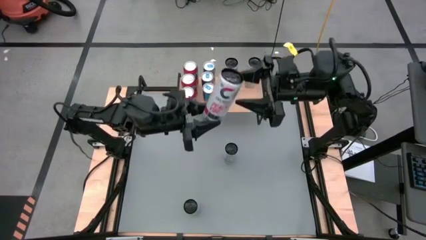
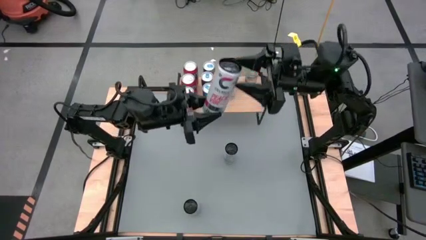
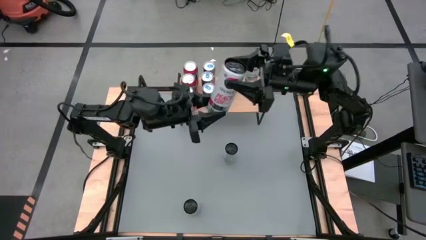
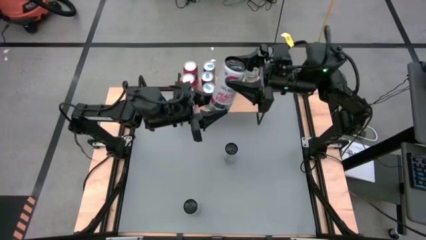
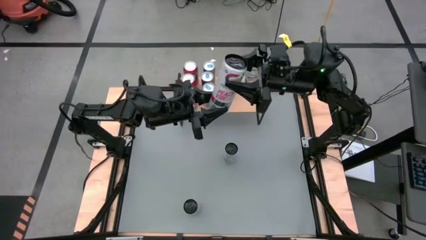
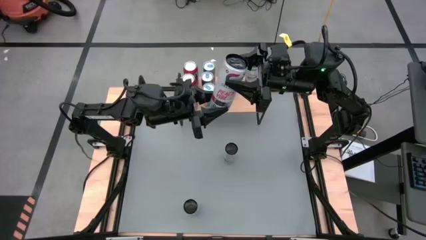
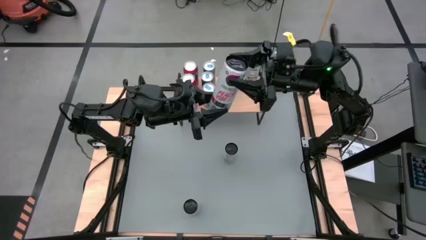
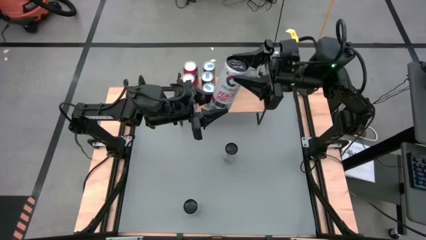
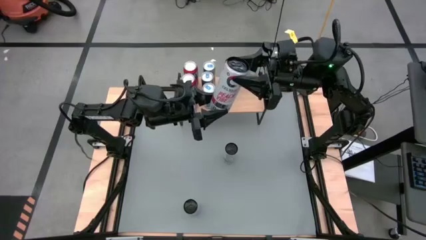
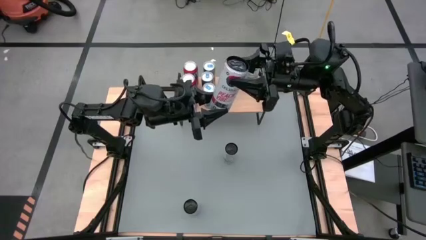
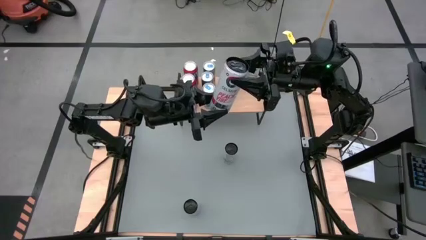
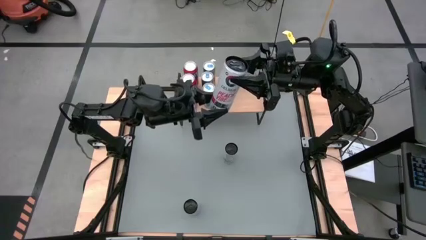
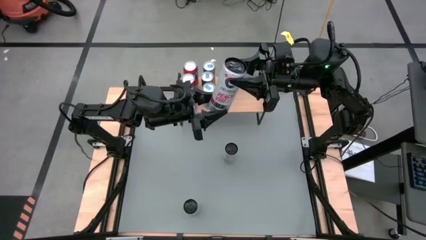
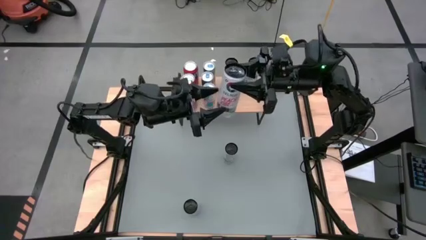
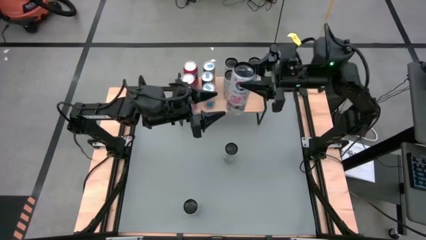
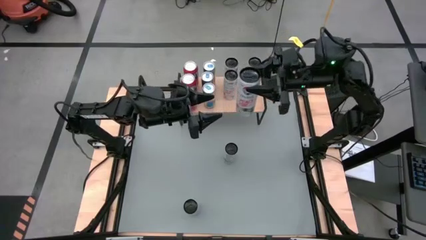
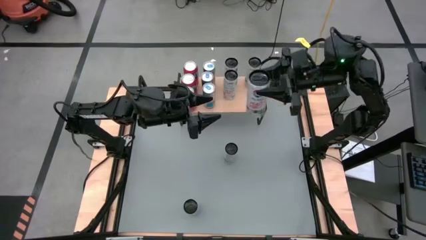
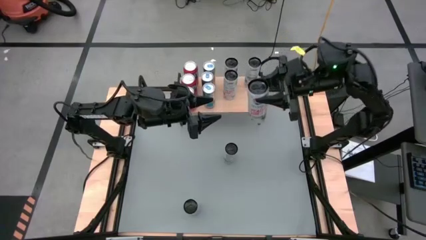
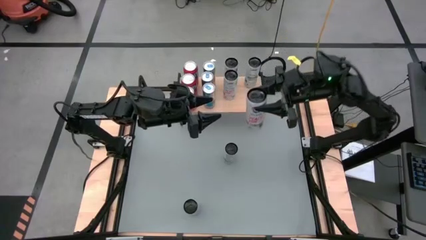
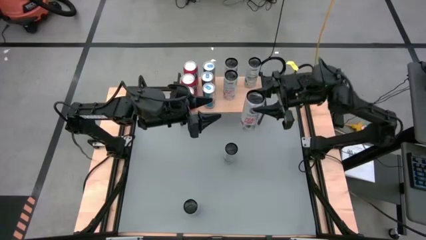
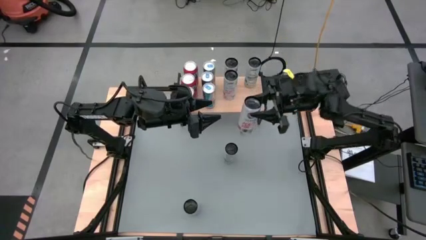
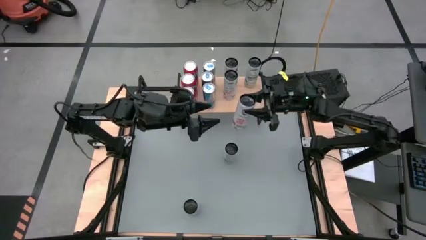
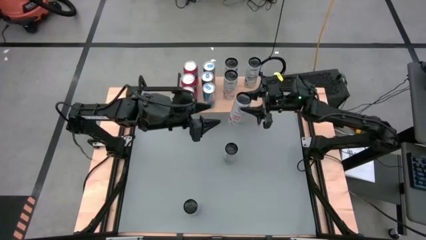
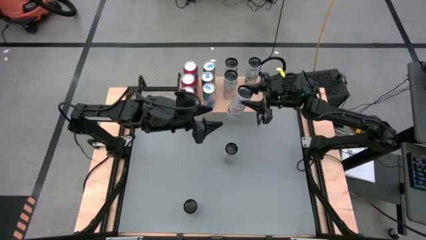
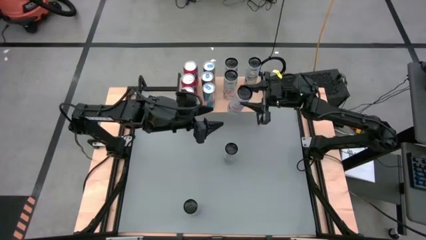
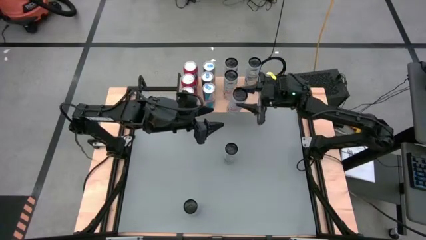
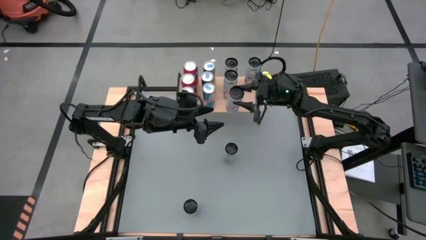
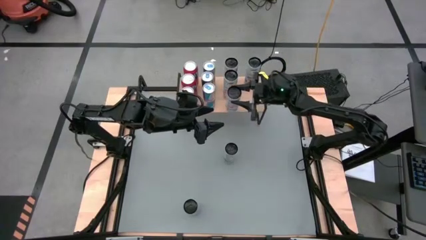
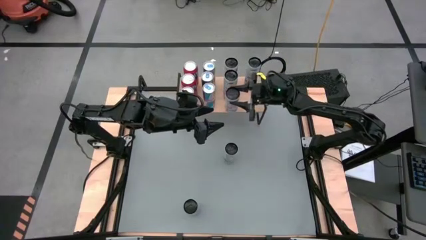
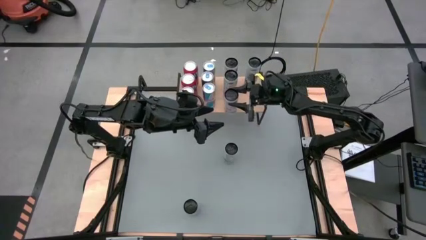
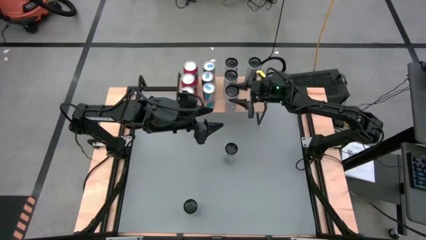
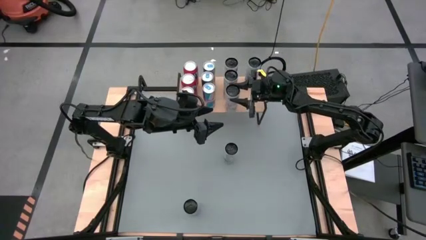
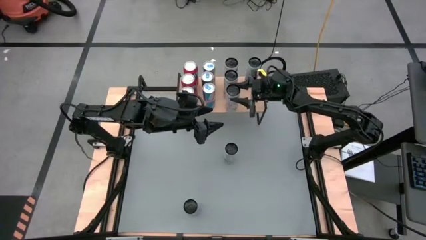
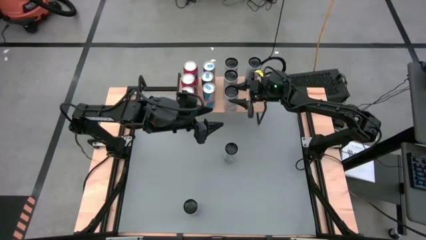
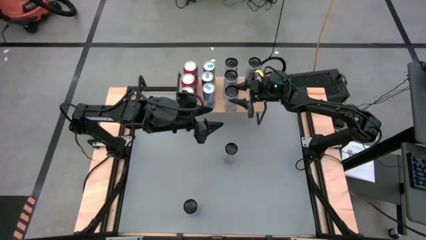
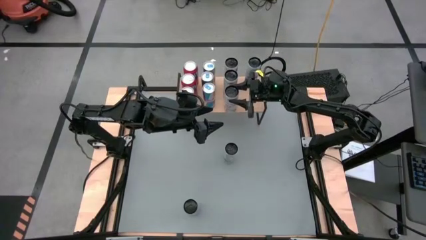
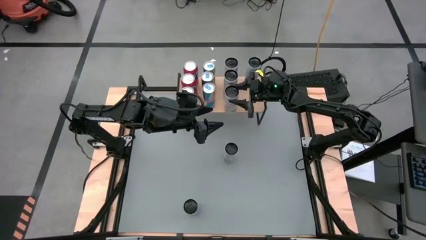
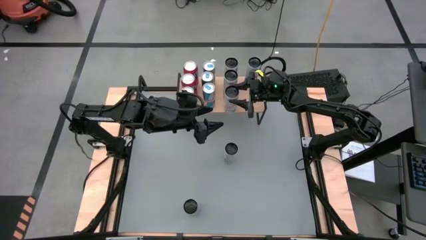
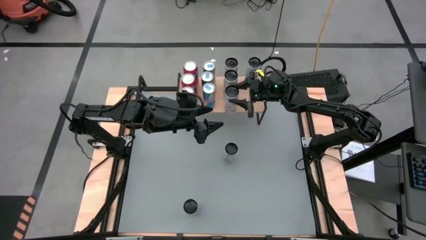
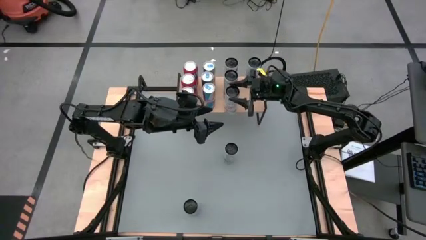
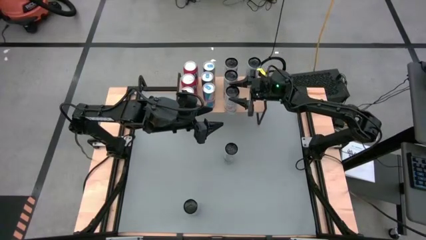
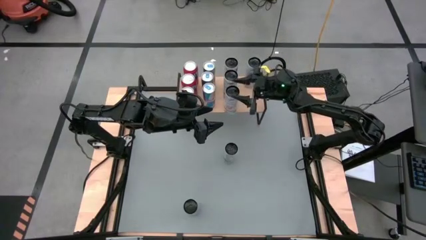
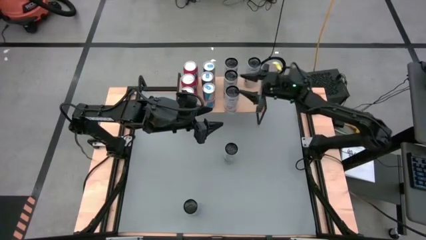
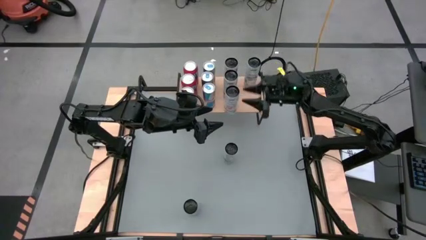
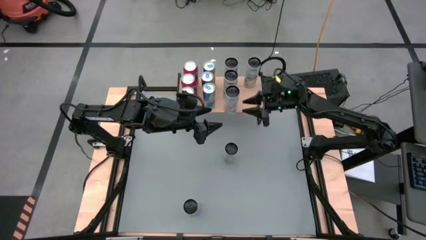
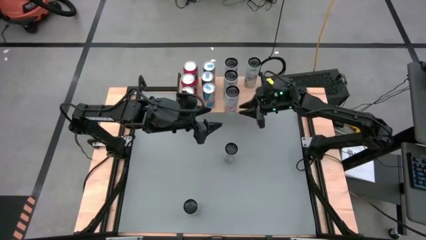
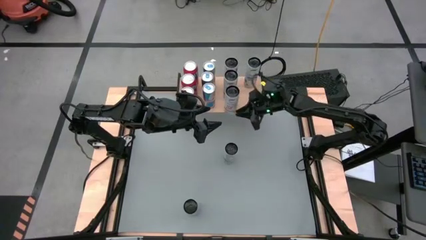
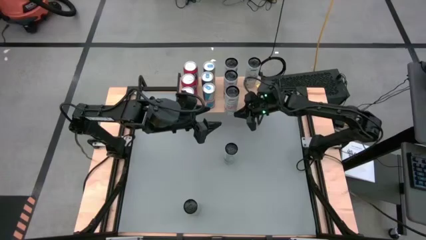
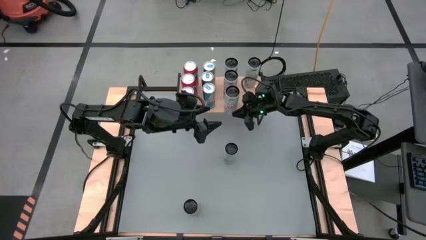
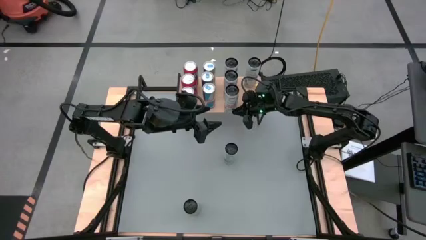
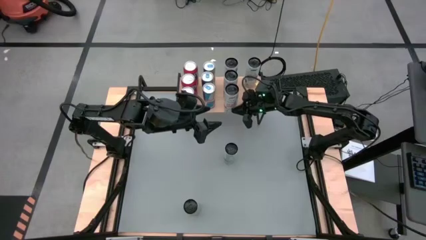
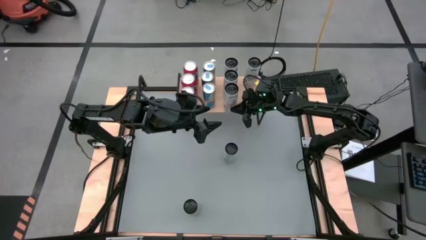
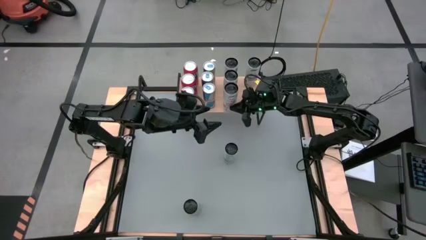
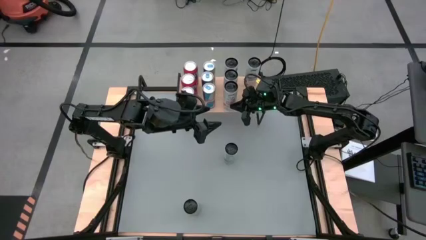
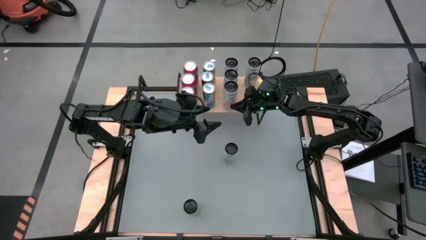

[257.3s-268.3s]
Task: Place canned beverage on shelf
Put the white-pink soda can on the shelf aligned with the other white-pink soda cans

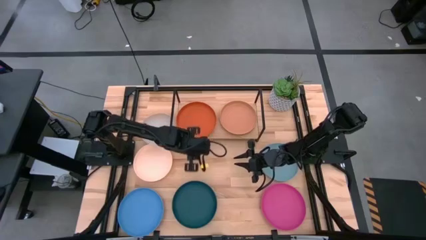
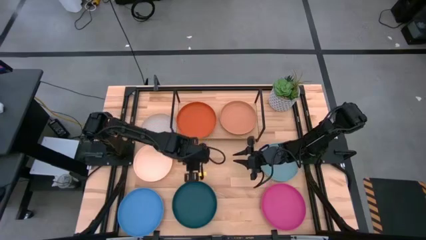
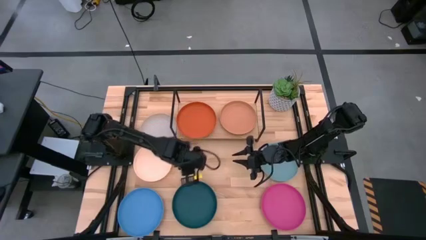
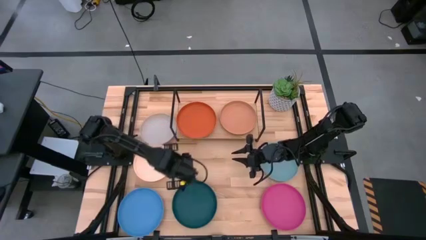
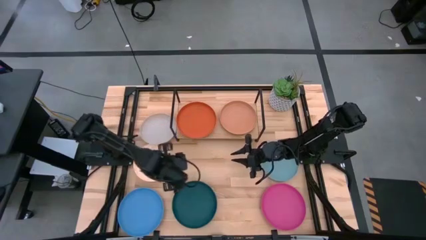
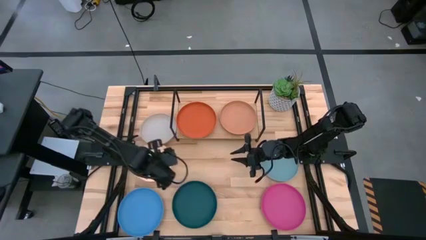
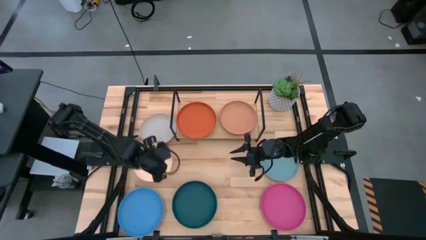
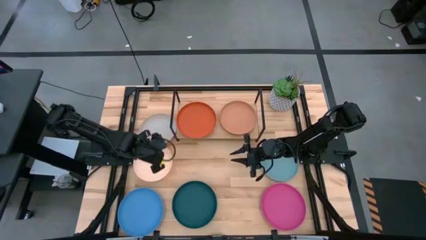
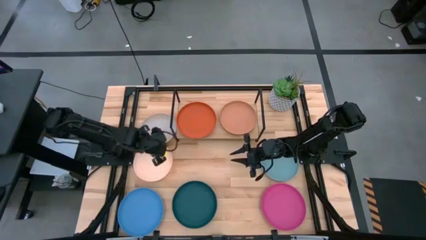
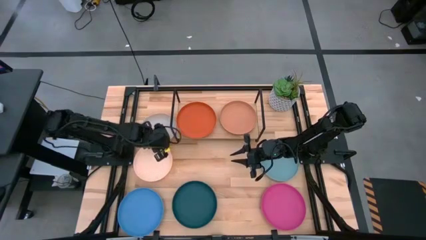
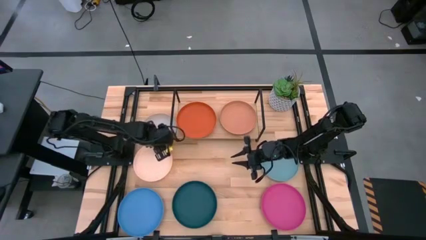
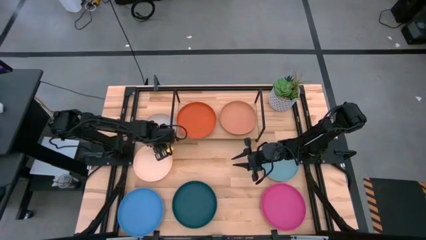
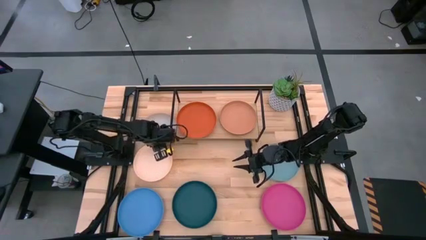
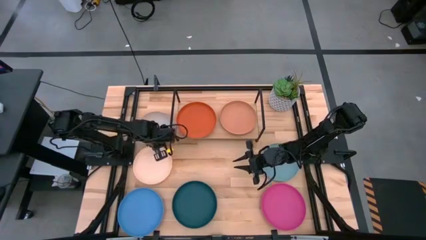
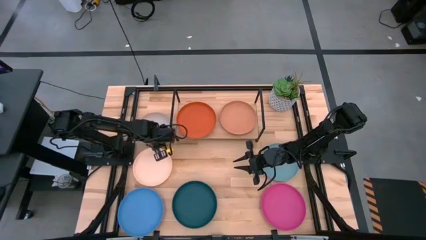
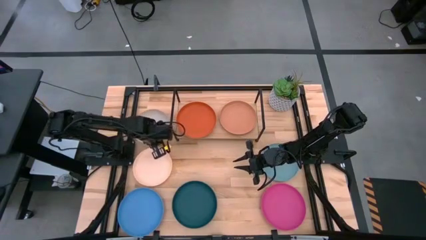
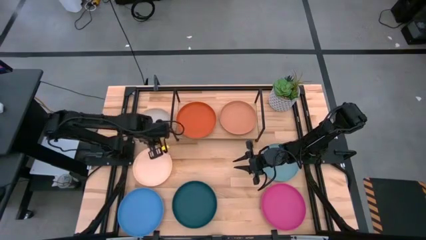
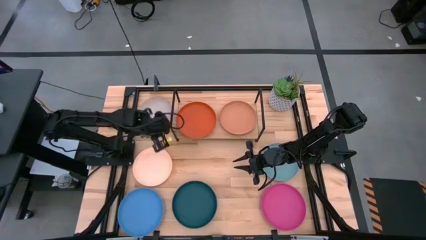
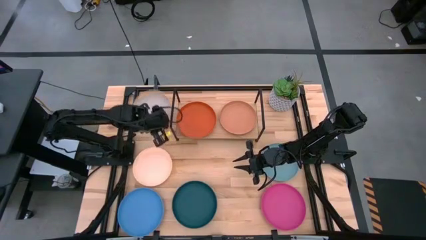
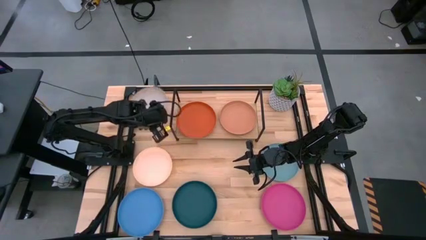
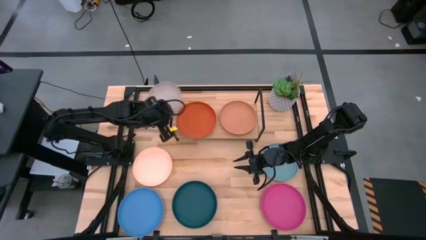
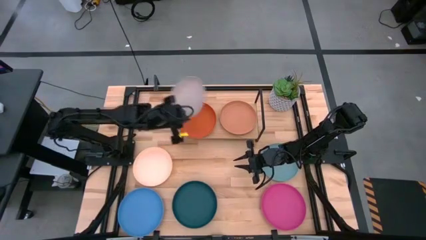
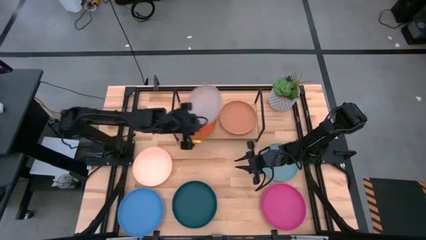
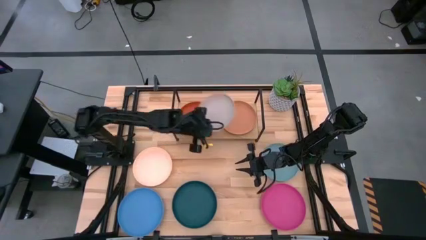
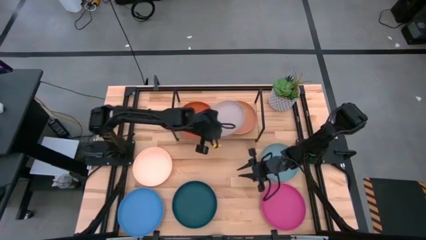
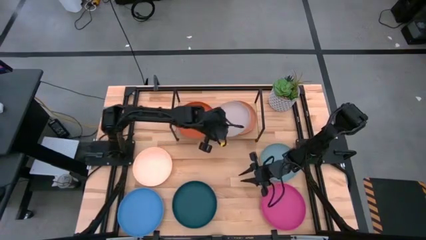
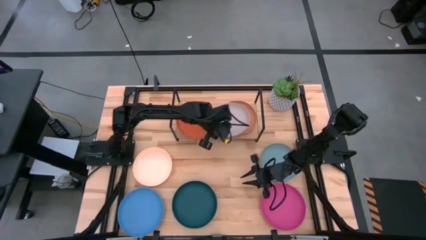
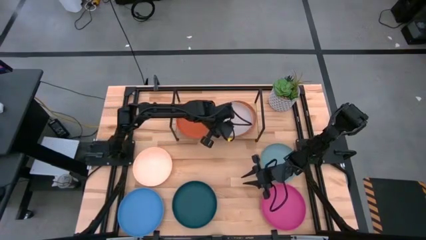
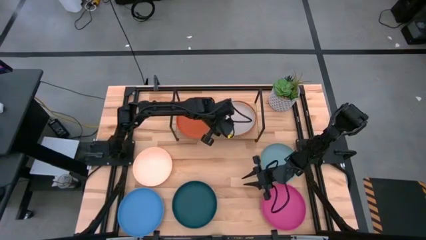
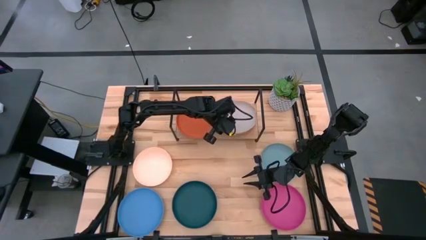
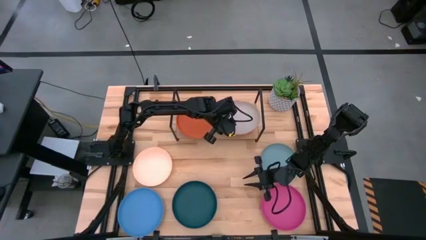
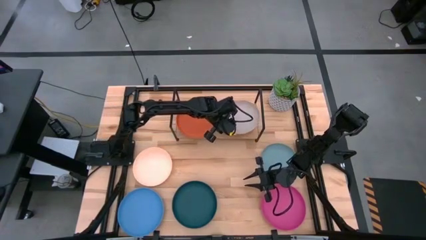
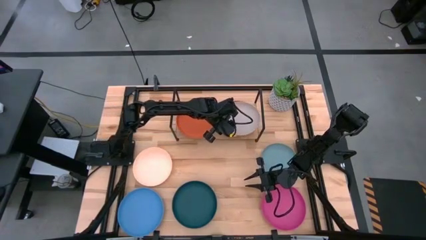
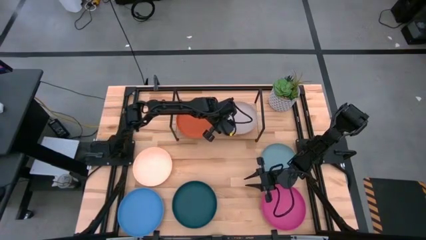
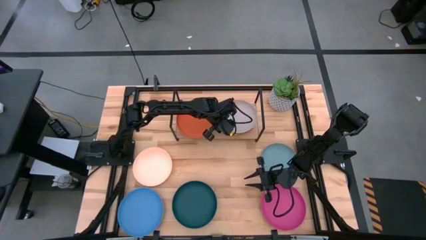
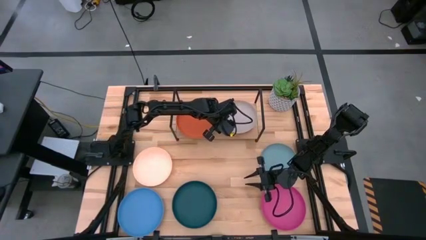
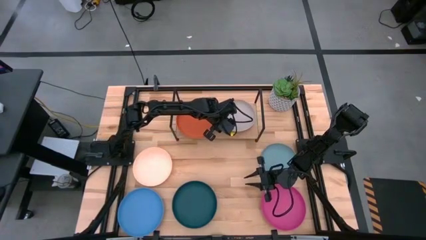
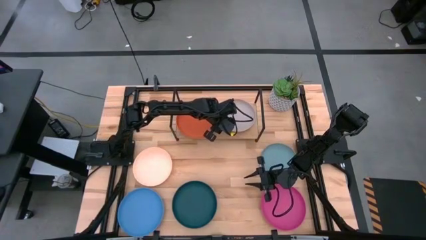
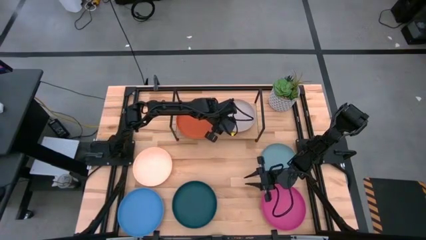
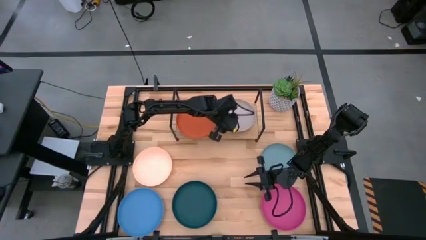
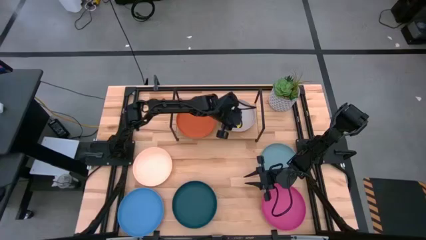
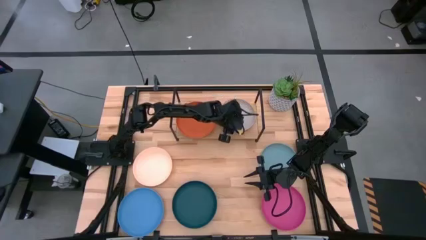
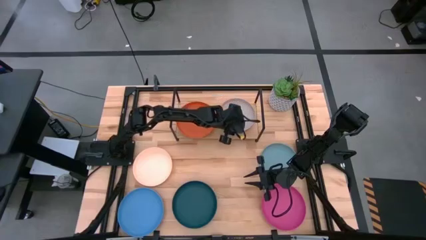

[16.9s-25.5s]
Task: Place and stack plates onto a shelf
Stack the gray plate on top of the brown plate on the shelf
